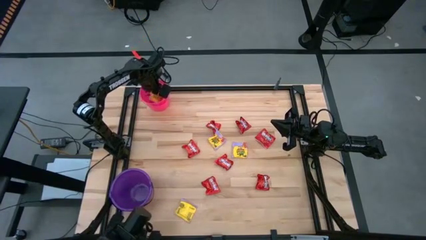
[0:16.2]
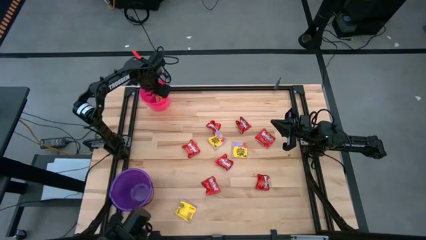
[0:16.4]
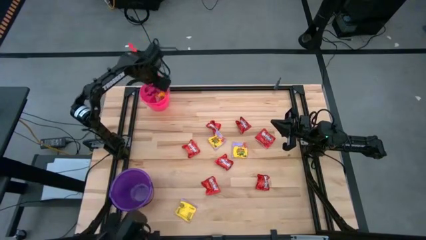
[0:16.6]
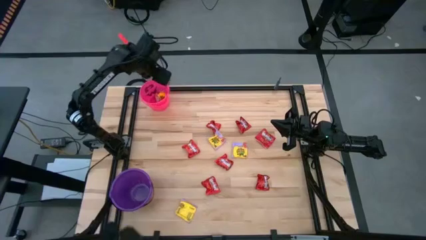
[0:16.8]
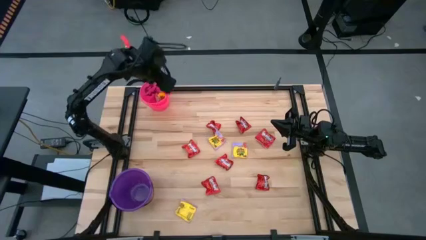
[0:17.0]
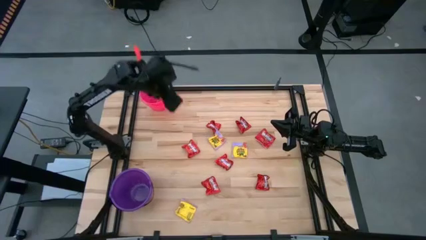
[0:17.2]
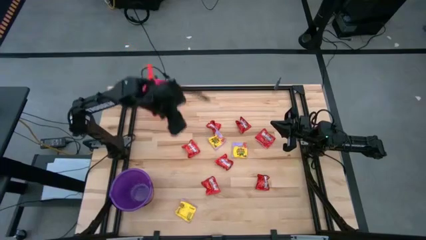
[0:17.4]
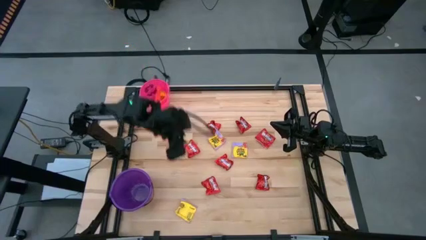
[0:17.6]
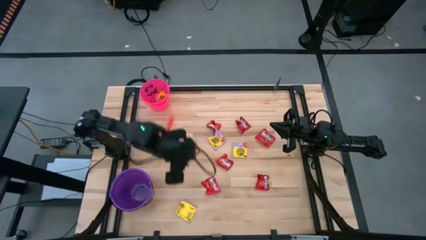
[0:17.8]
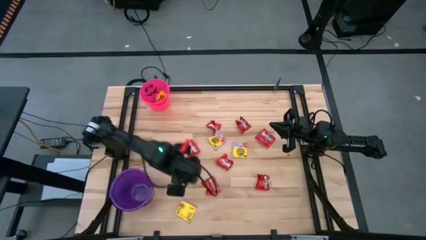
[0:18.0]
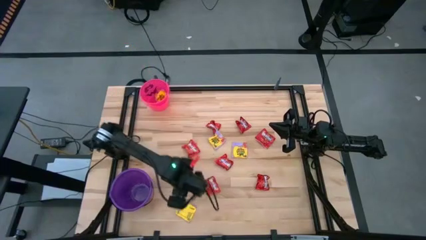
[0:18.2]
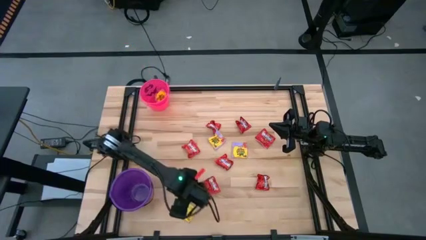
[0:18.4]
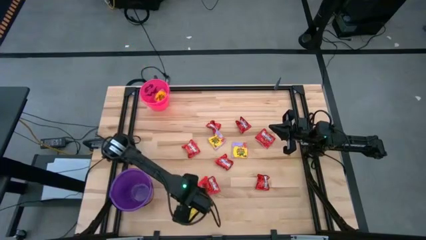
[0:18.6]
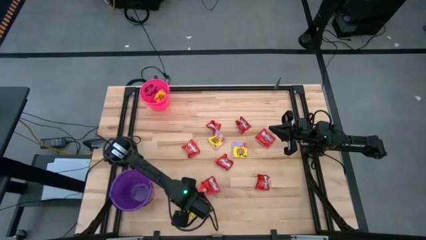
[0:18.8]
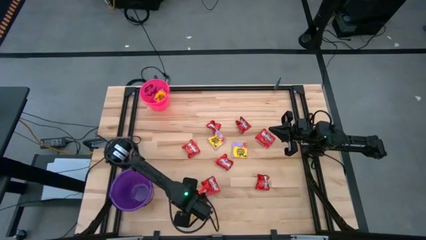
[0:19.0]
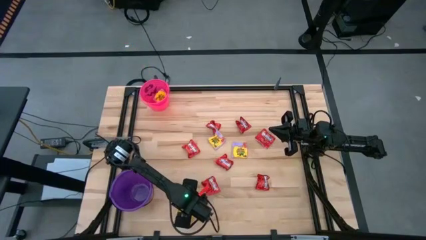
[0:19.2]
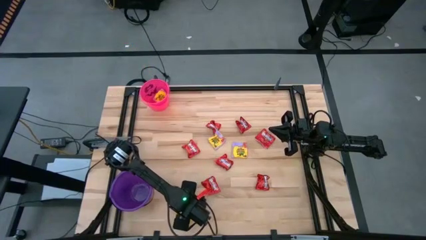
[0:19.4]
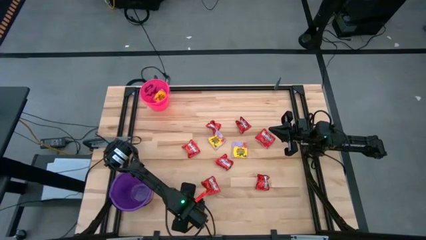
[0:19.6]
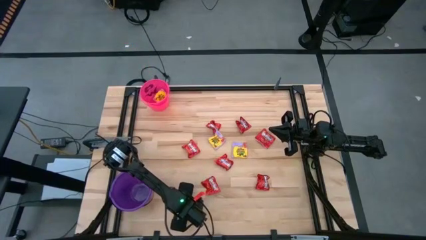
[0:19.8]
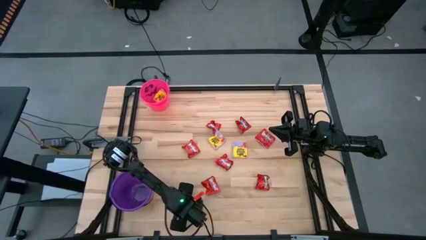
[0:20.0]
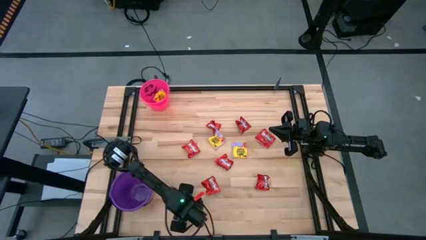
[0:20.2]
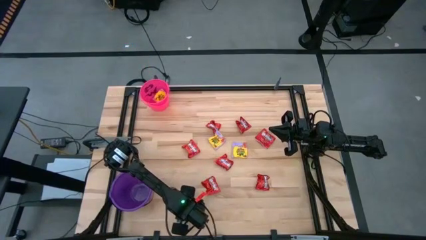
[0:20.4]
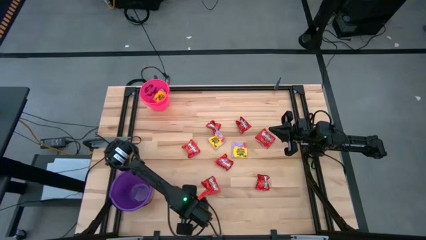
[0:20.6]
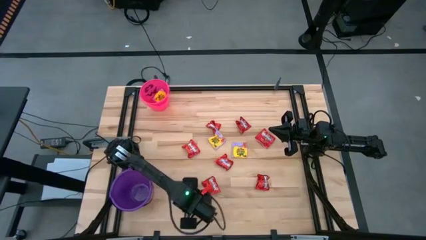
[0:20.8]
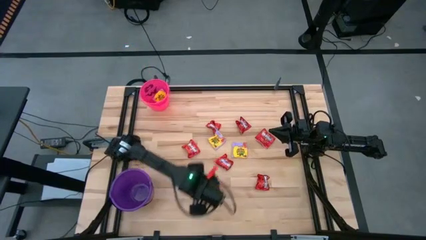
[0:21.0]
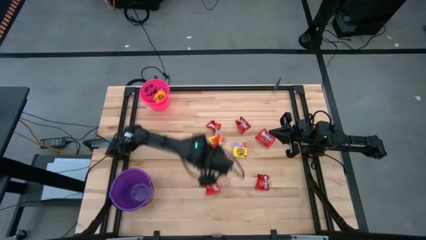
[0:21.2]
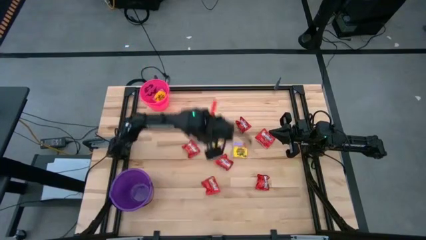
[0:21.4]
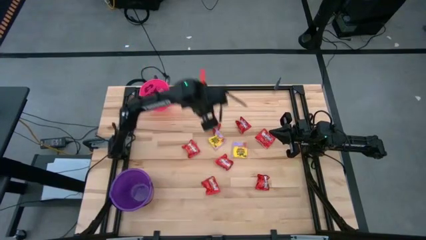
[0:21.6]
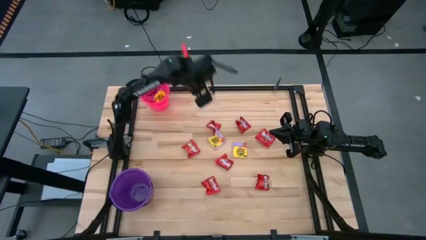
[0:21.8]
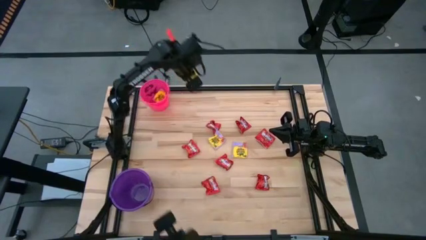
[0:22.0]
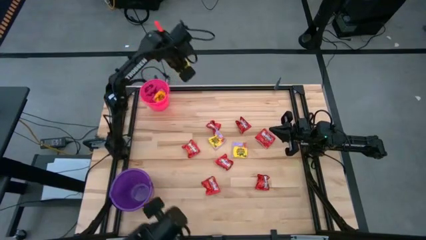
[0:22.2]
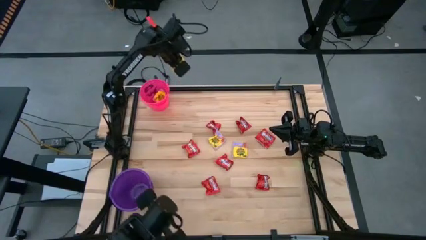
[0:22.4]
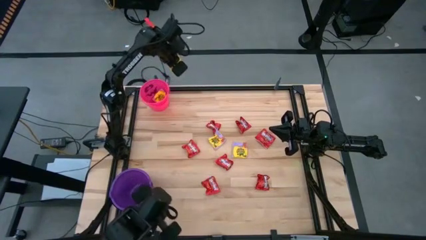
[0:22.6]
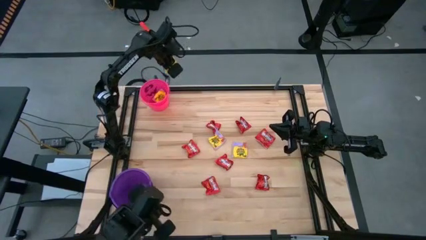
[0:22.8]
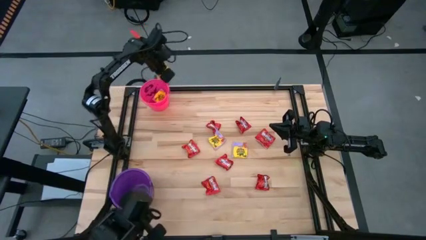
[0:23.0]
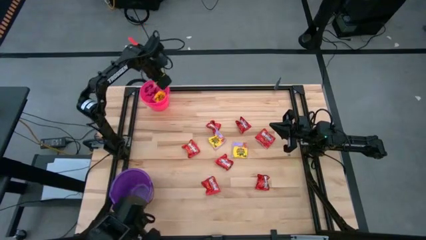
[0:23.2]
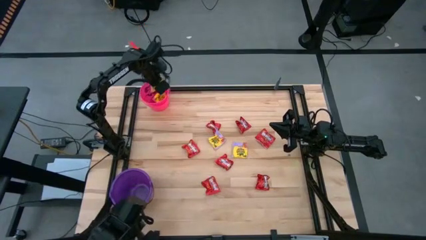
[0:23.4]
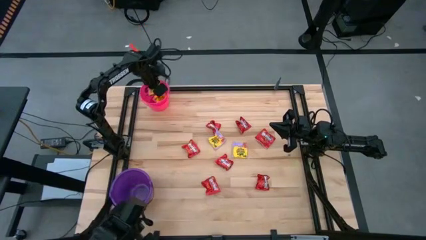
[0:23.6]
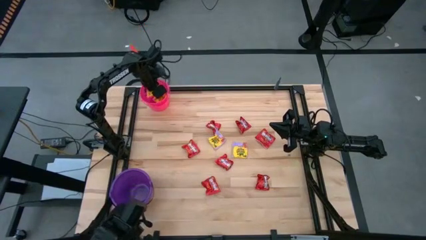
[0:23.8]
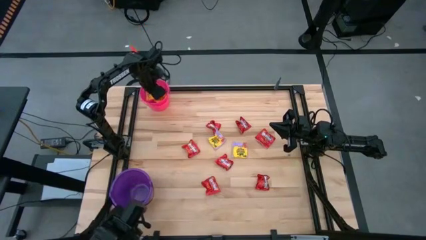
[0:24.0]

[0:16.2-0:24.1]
Task: Sort candy by brand, put in halloween buckets
Put the yellow candy into the pink bucket

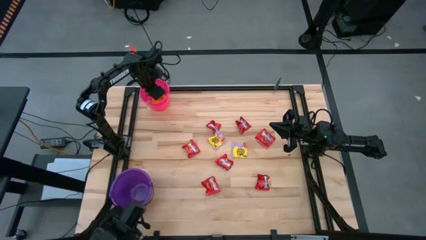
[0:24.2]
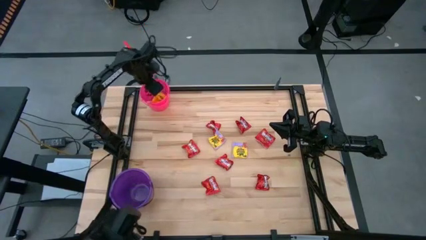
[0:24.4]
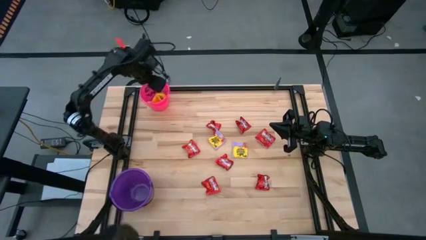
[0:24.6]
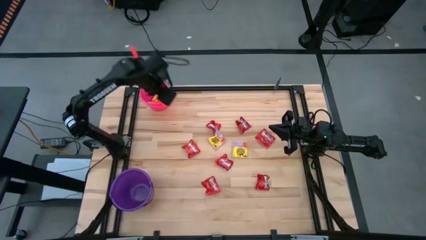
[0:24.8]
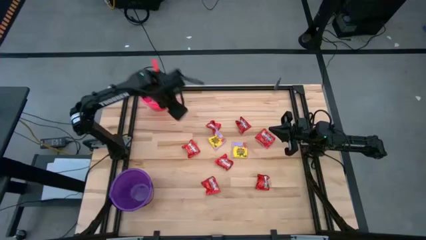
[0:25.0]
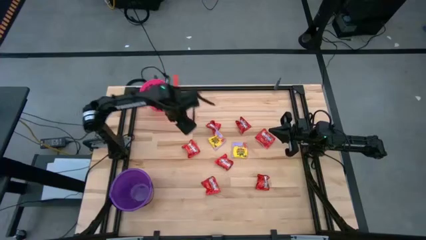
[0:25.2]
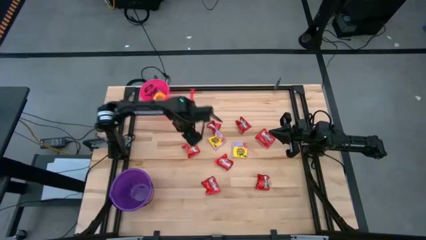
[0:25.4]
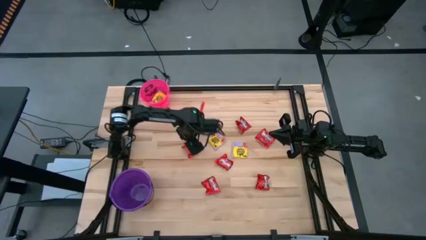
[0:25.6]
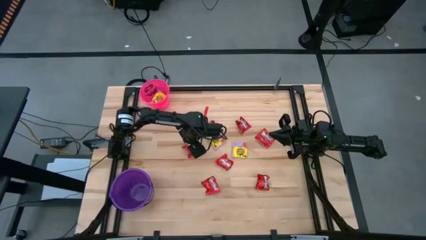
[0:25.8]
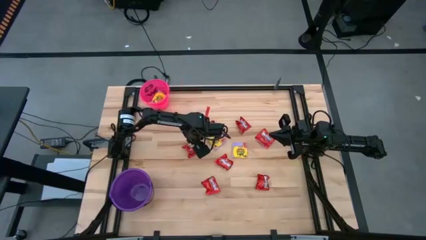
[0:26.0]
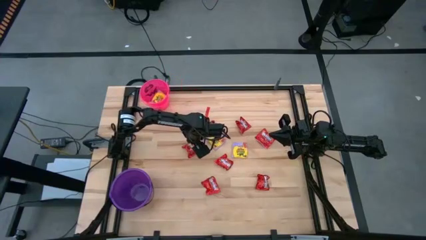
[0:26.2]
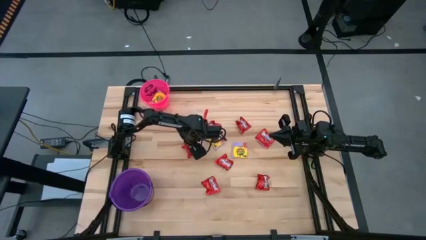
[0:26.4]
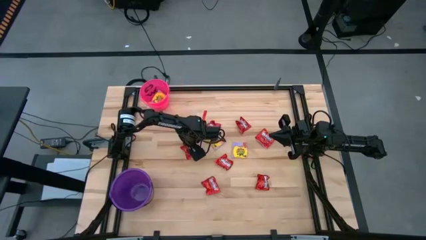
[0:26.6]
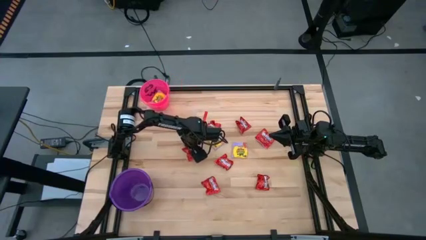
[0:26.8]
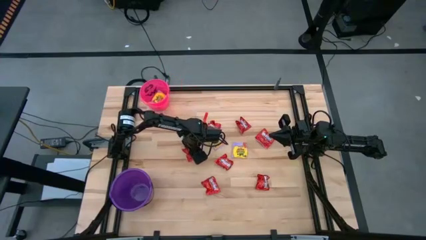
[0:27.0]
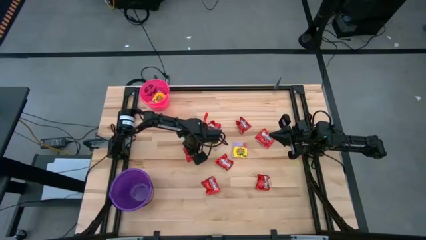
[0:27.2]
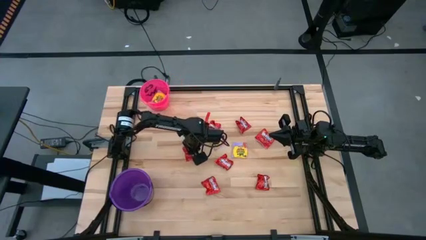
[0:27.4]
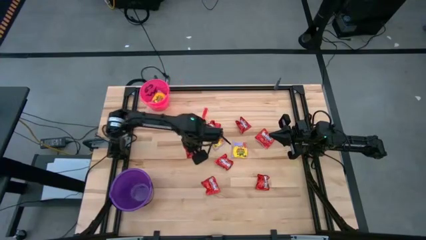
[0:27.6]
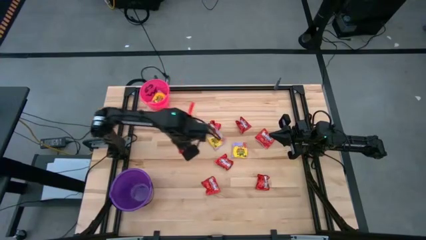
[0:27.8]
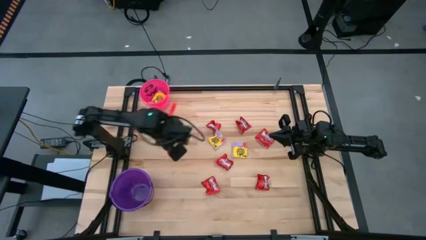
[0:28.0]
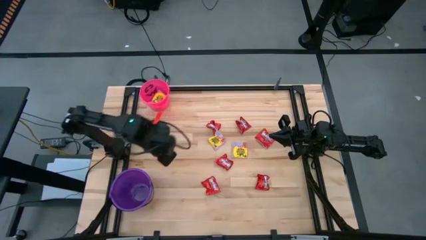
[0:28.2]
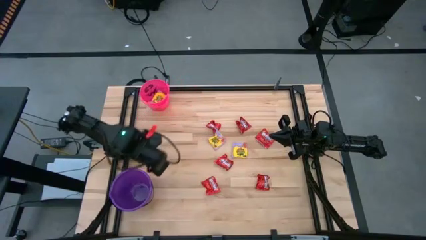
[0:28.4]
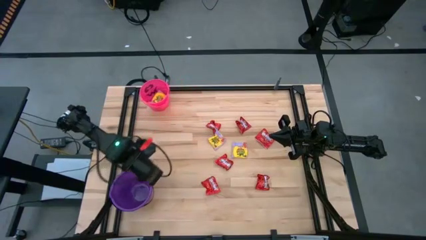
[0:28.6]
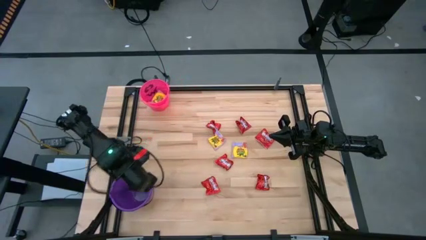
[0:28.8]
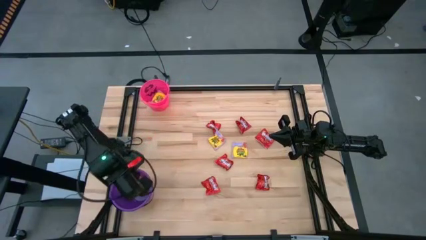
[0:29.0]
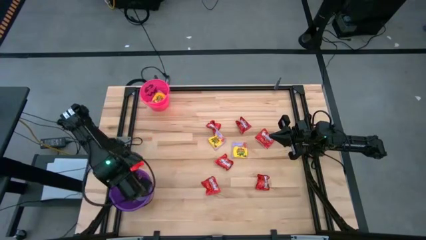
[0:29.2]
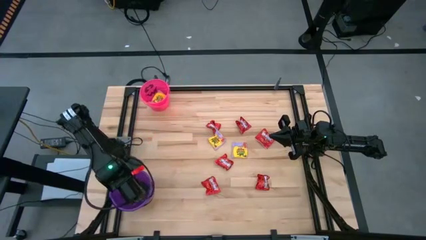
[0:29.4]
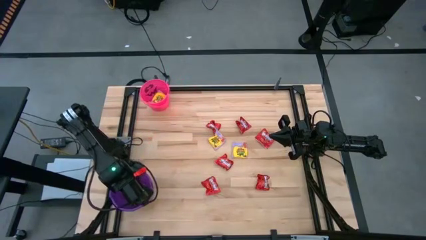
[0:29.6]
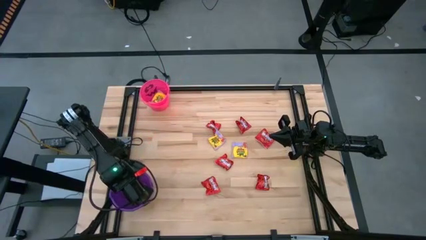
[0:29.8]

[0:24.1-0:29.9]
Put the red candy into the violet bucket

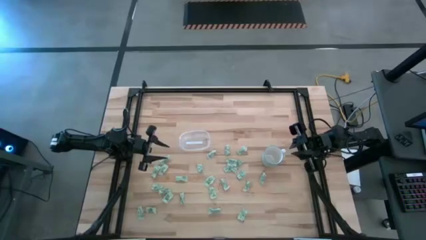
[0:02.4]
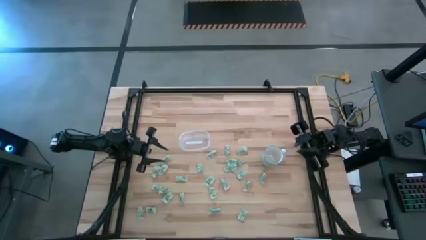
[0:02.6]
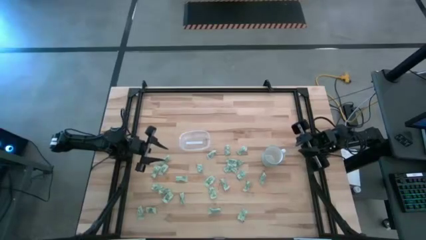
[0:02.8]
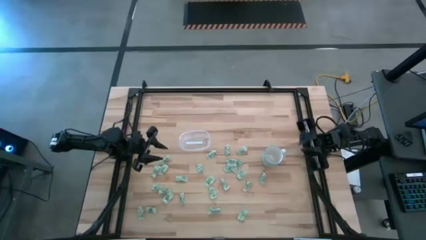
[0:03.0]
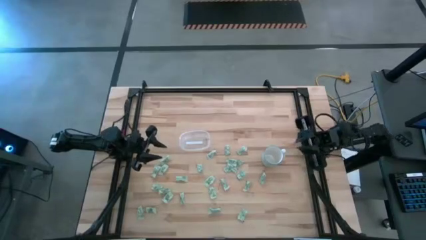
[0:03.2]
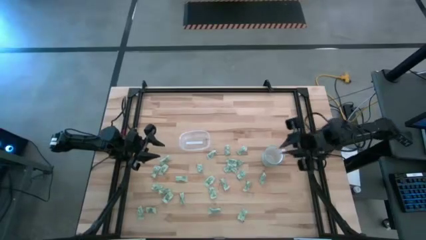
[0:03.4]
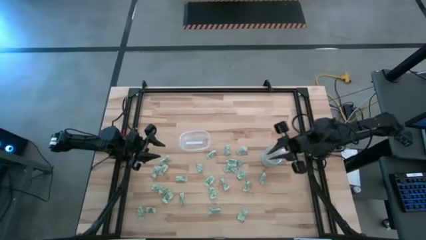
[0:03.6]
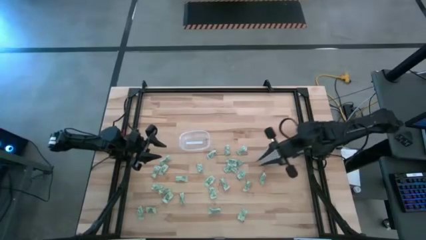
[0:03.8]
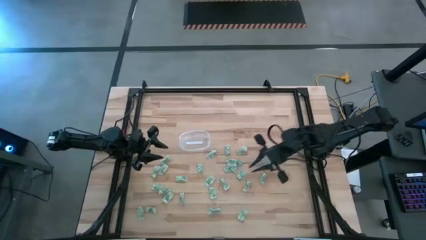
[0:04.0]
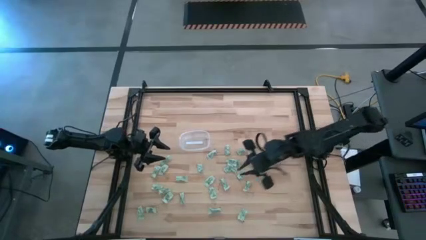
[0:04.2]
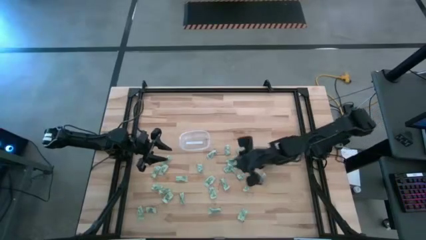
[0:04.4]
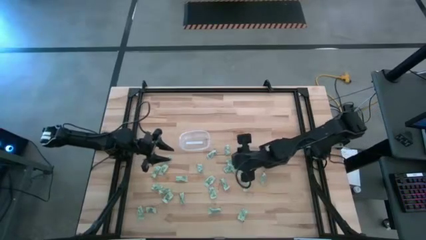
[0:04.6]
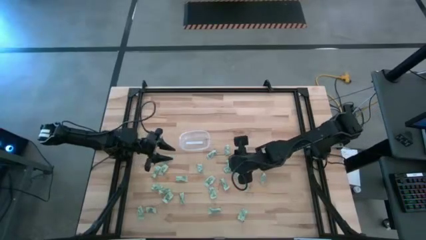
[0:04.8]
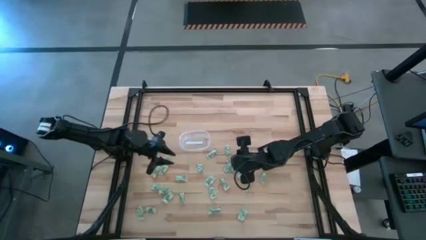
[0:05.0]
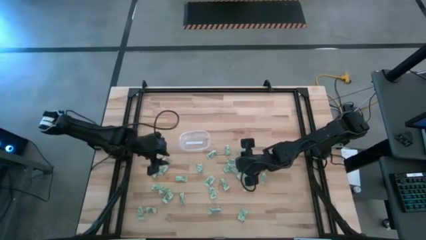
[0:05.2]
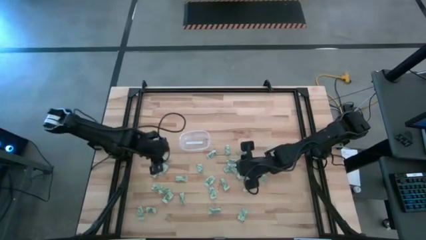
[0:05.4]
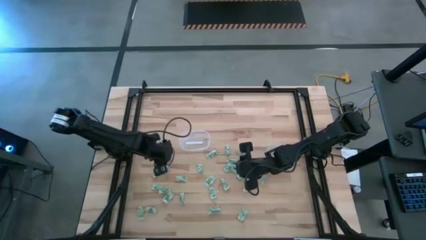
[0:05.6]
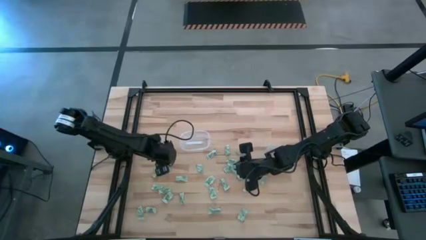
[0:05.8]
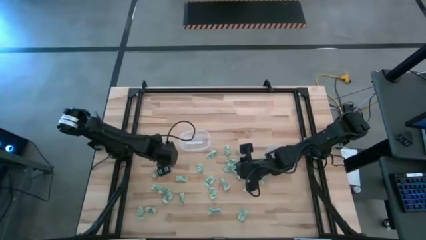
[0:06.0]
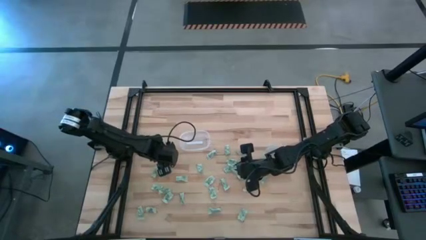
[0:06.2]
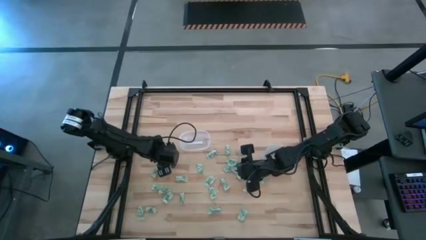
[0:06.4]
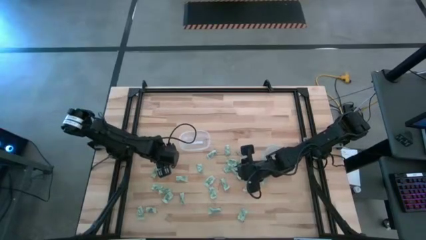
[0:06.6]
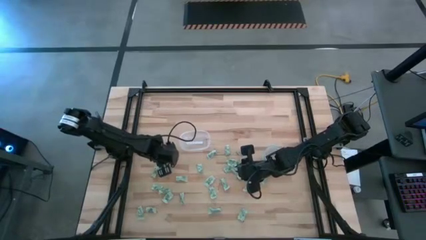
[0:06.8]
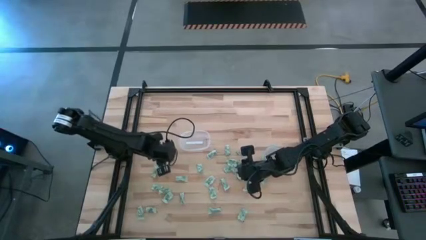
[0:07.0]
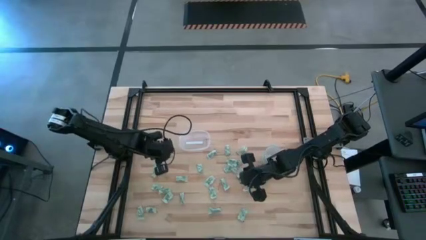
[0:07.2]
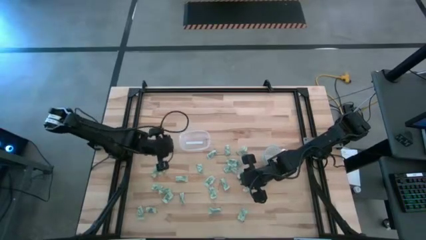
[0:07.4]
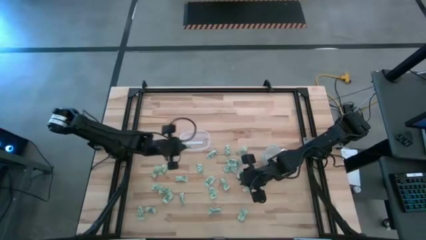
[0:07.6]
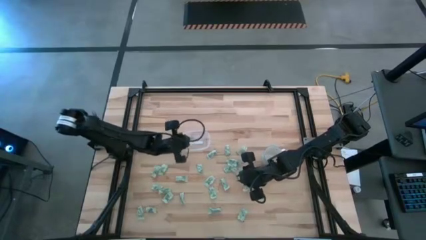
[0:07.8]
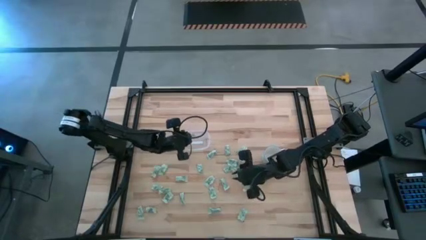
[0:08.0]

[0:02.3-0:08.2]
Task: Pick and place Stevia / Truvia into bins
Put the stevia packet into the transparent bin
